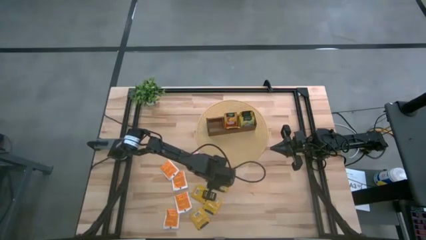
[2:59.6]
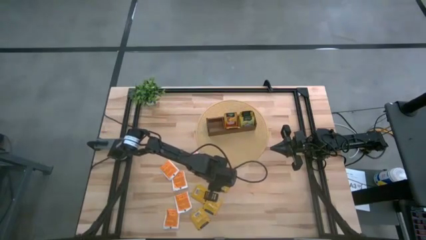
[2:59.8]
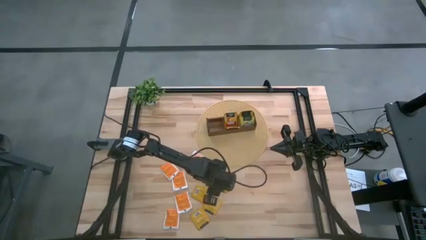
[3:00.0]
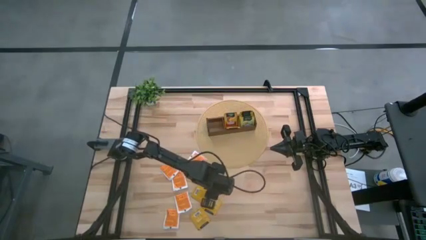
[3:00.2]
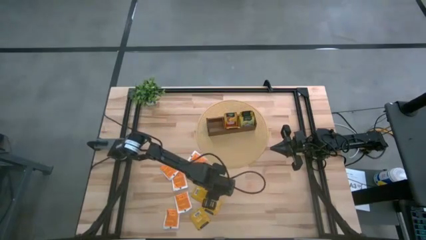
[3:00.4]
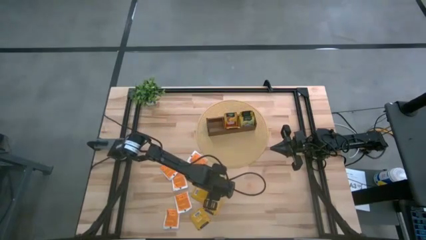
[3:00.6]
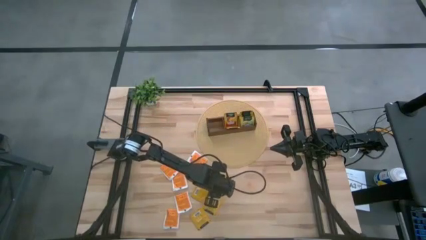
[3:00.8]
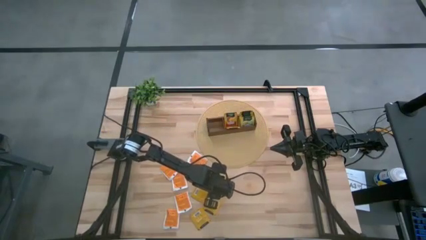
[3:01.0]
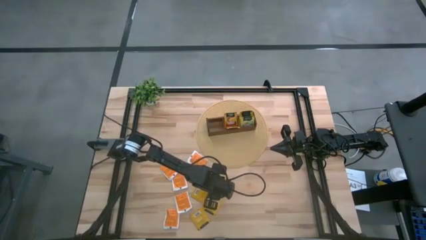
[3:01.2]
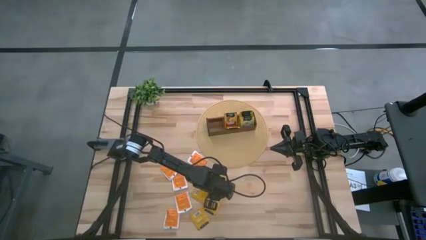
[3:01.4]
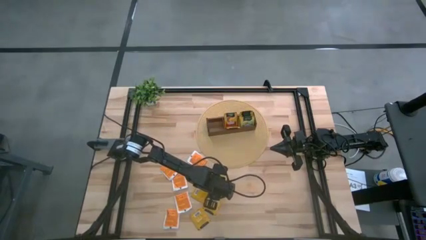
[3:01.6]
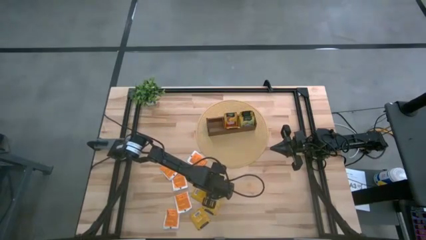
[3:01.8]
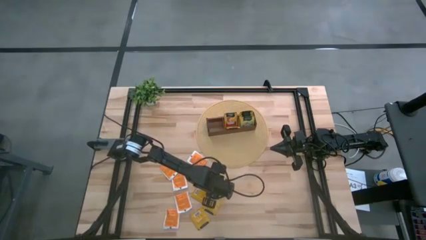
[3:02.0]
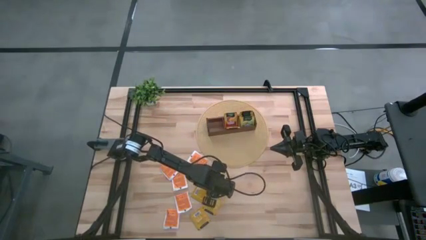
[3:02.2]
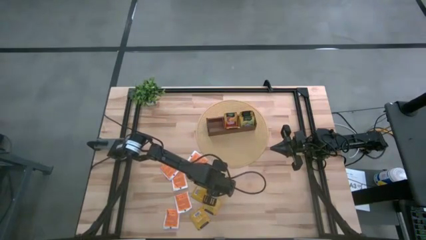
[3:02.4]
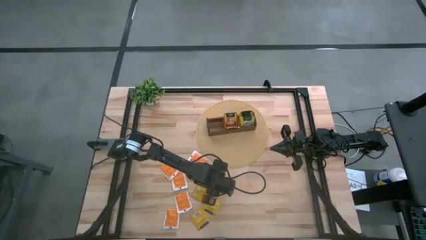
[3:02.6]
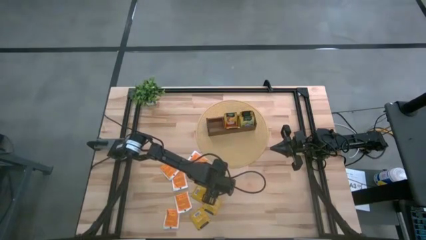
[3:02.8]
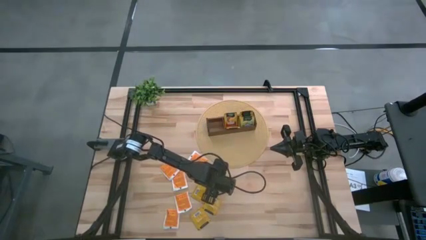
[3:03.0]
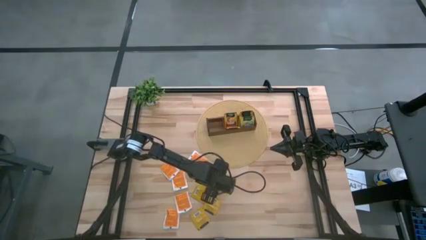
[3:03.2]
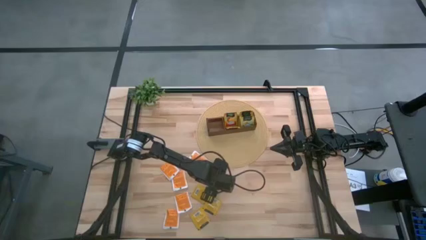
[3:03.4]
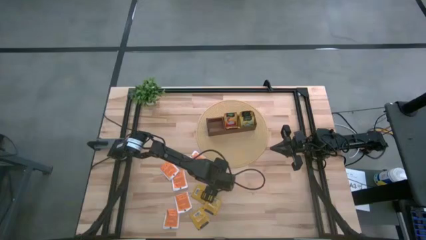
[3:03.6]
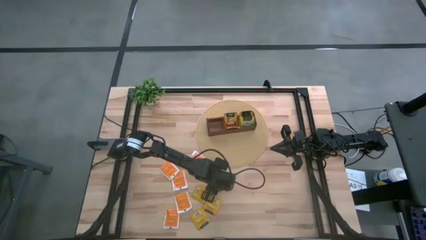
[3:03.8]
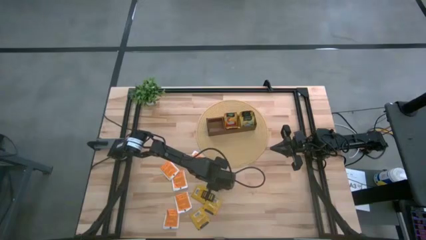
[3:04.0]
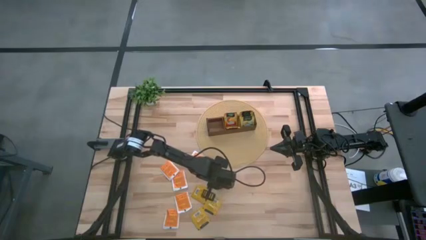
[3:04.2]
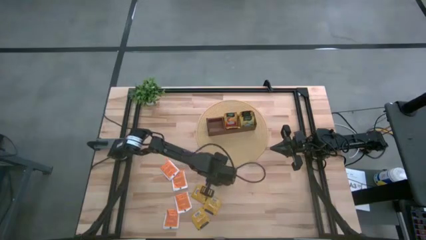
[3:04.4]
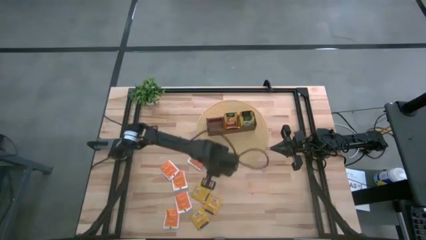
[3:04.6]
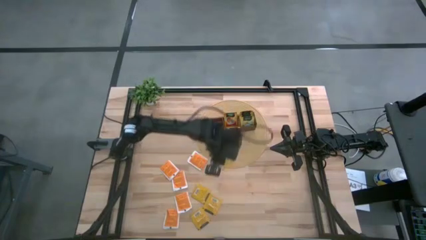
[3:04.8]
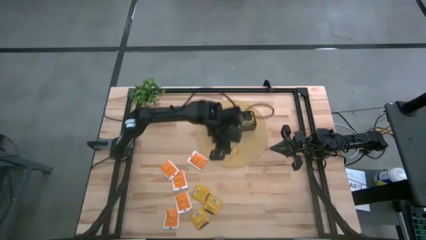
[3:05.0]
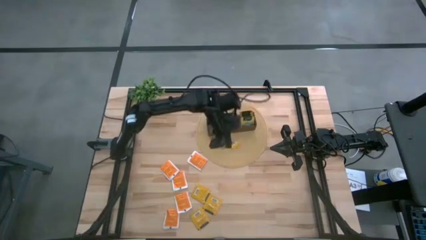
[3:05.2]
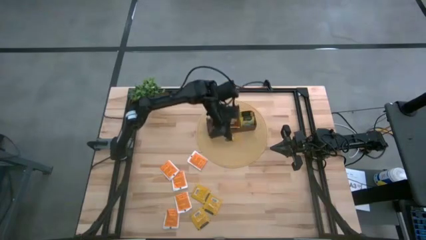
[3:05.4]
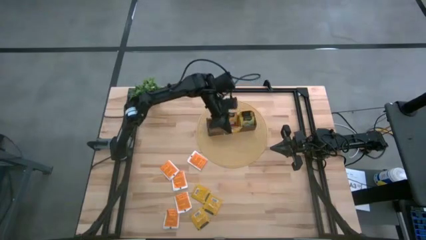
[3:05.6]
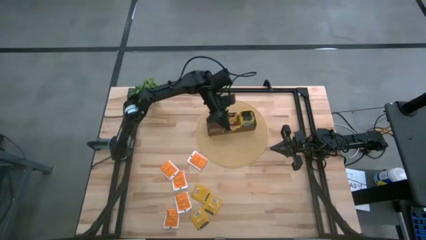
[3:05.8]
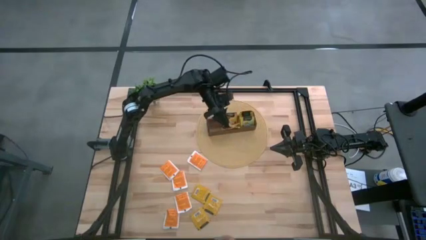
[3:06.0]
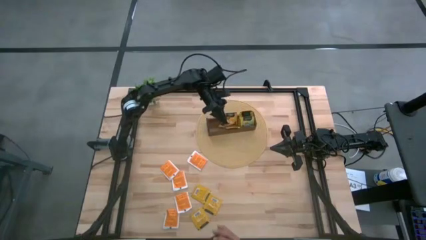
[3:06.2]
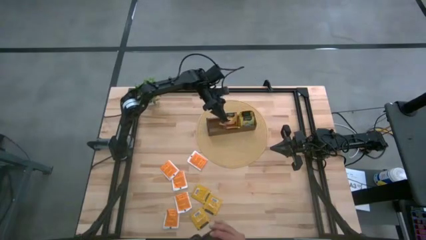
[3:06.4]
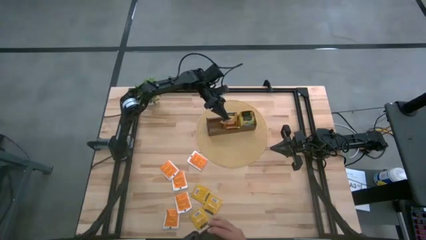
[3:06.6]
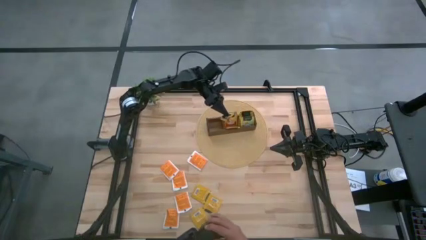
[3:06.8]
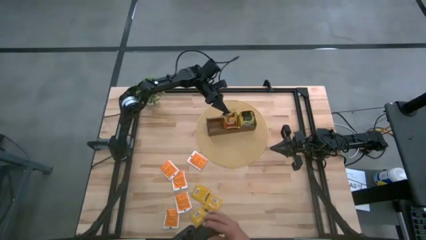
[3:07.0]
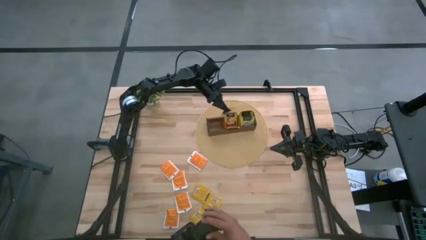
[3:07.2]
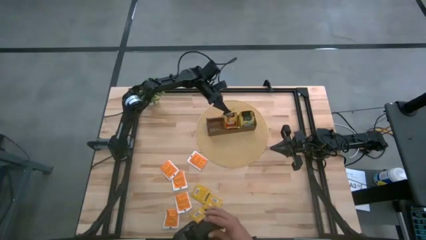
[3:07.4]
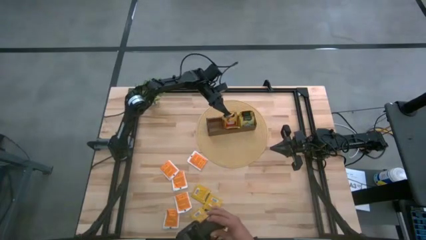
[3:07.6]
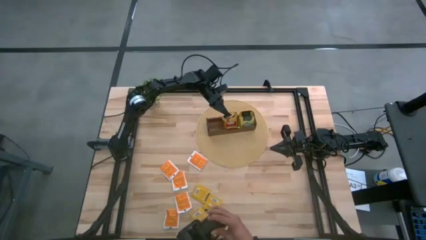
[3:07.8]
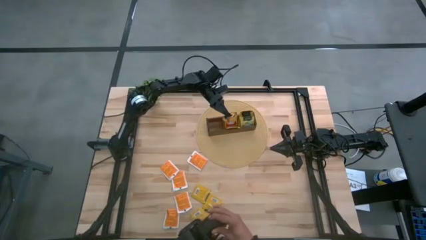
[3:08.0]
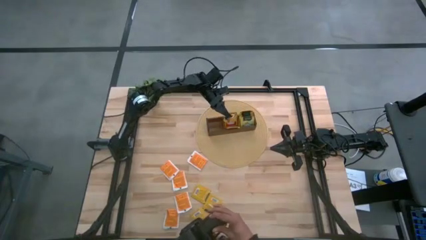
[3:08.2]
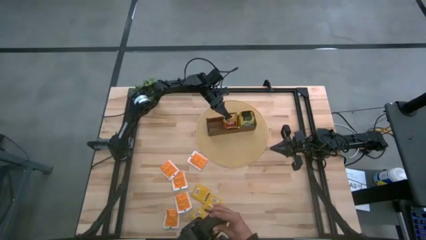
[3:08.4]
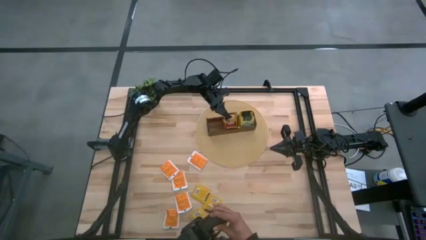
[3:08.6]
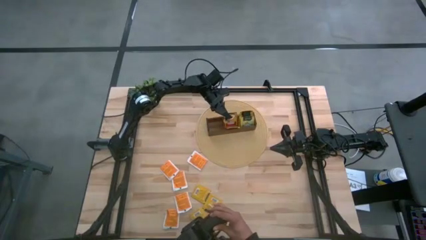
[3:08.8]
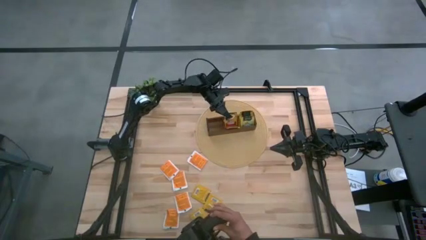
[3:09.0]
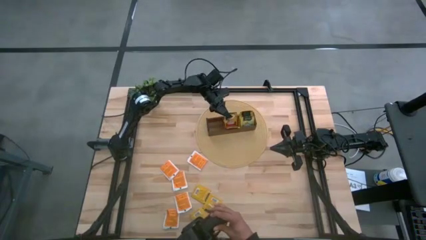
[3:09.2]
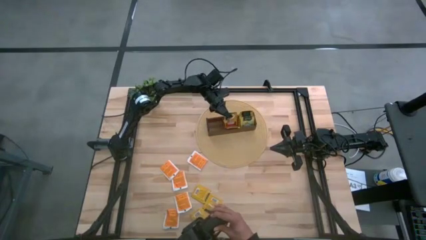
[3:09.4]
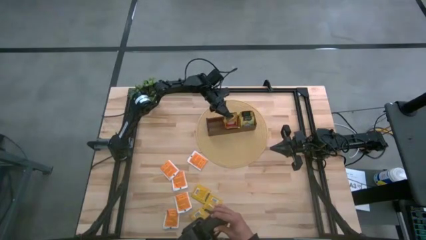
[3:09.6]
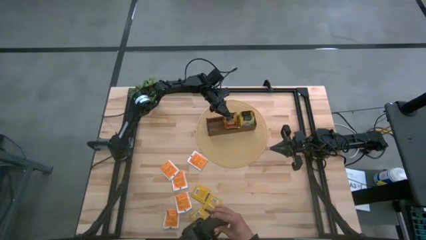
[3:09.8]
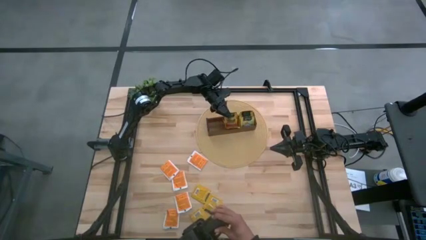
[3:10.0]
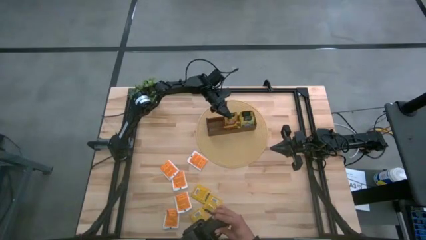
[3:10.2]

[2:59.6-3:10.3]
Task: Pick & Place Tea
Put the orange tea bag into the middle section of the wooden organizer
